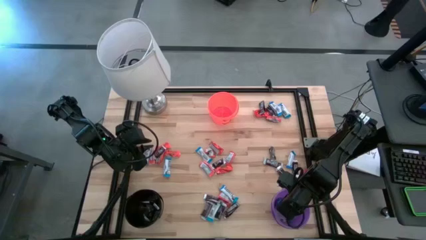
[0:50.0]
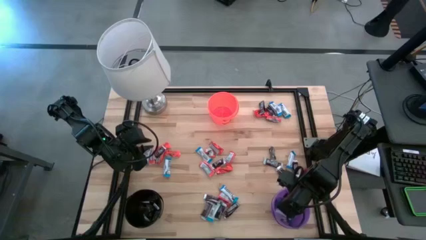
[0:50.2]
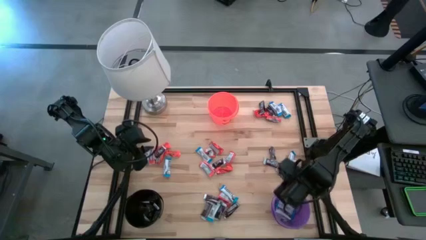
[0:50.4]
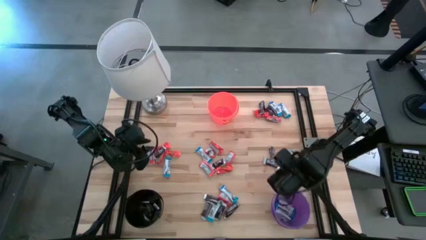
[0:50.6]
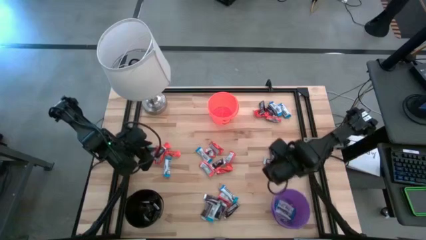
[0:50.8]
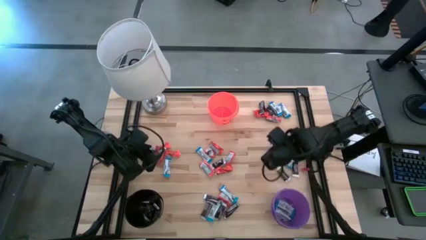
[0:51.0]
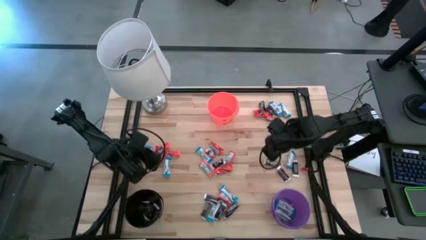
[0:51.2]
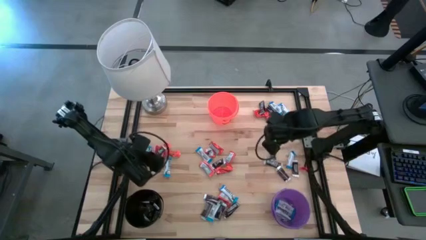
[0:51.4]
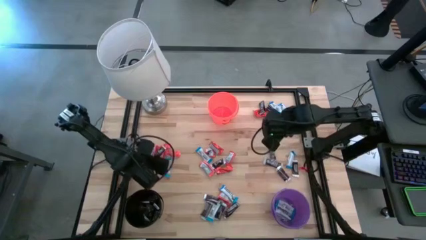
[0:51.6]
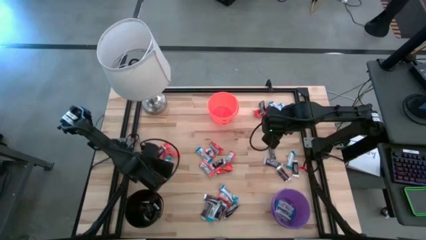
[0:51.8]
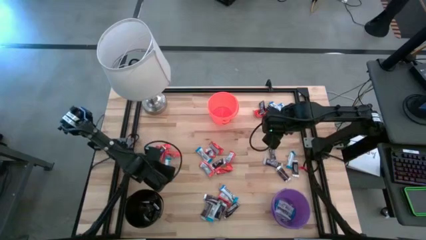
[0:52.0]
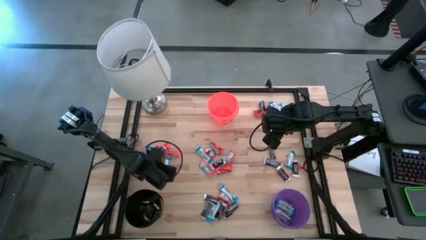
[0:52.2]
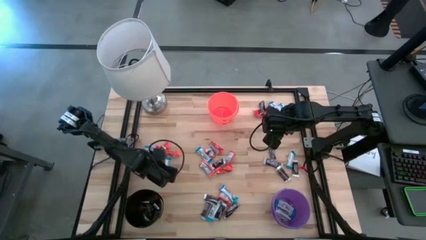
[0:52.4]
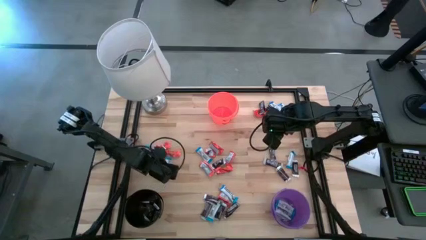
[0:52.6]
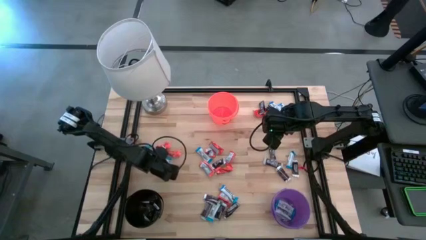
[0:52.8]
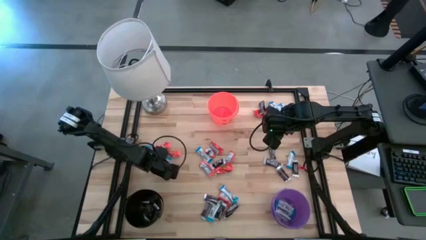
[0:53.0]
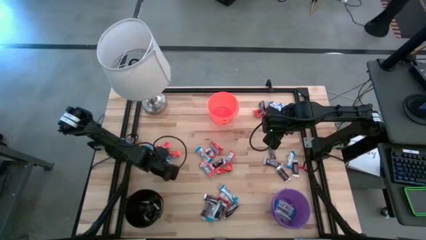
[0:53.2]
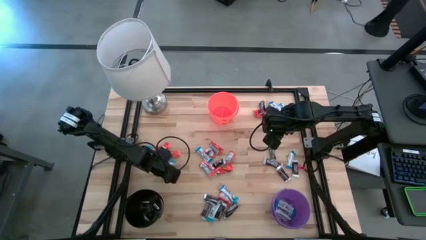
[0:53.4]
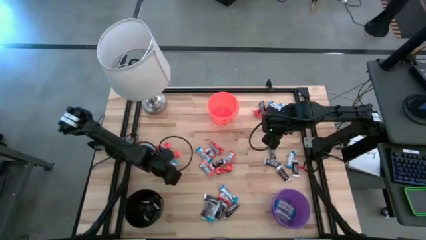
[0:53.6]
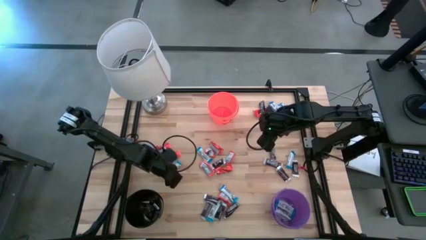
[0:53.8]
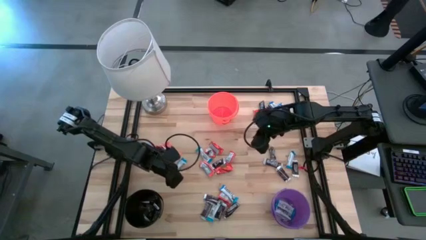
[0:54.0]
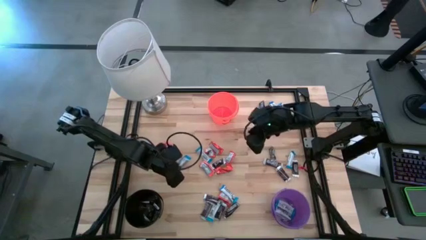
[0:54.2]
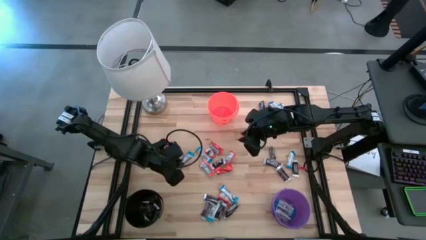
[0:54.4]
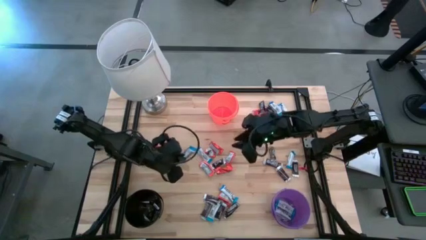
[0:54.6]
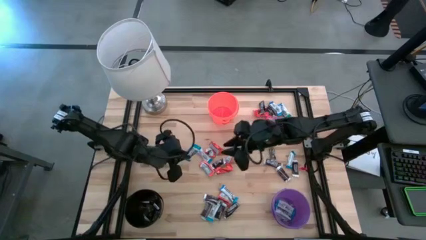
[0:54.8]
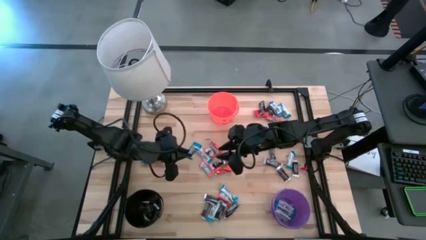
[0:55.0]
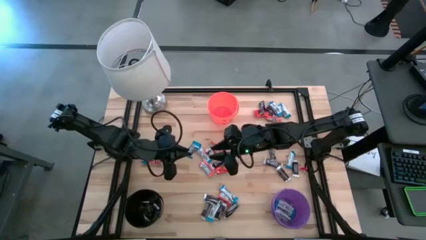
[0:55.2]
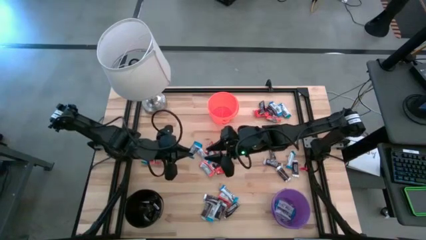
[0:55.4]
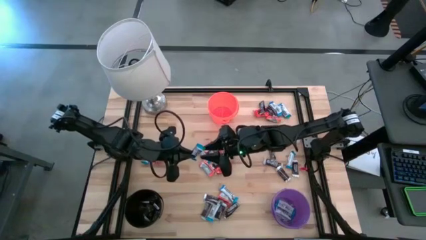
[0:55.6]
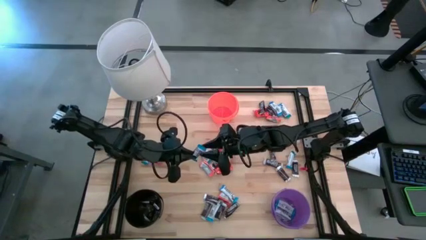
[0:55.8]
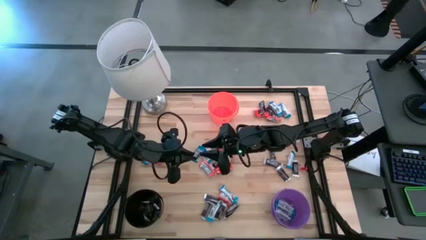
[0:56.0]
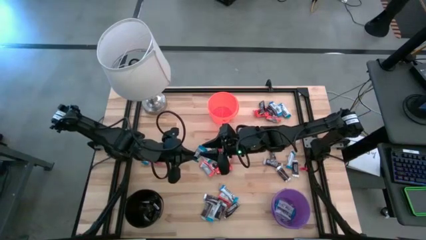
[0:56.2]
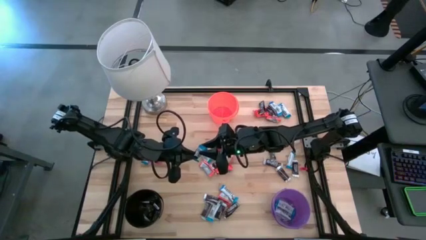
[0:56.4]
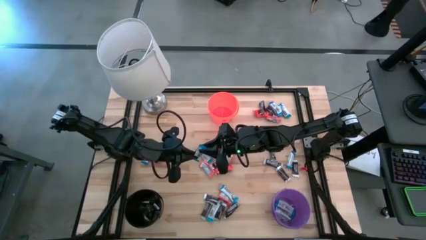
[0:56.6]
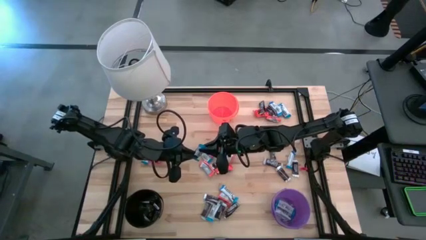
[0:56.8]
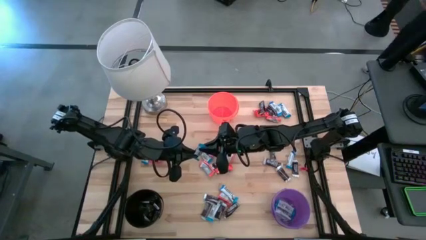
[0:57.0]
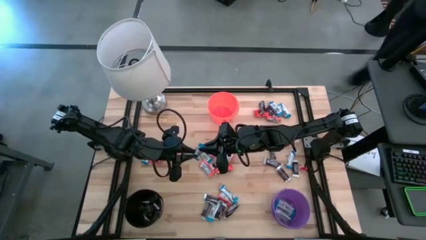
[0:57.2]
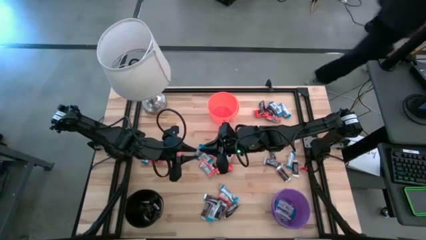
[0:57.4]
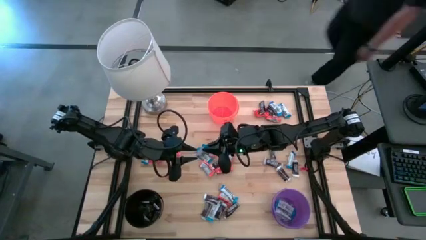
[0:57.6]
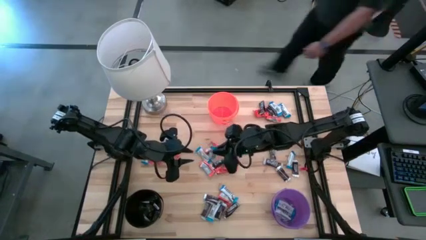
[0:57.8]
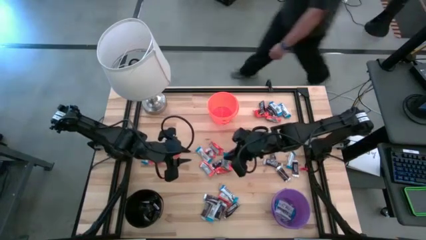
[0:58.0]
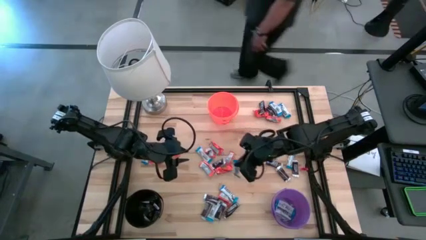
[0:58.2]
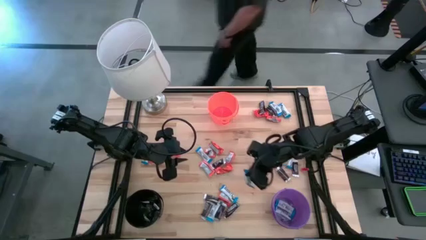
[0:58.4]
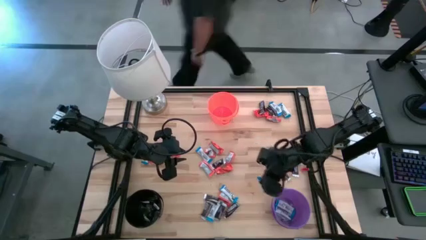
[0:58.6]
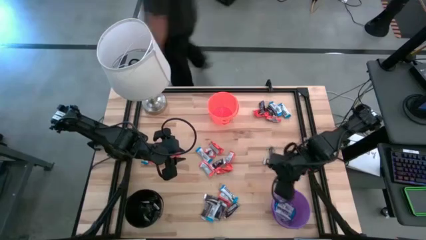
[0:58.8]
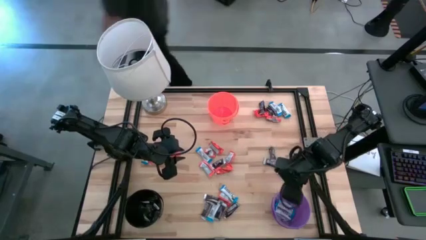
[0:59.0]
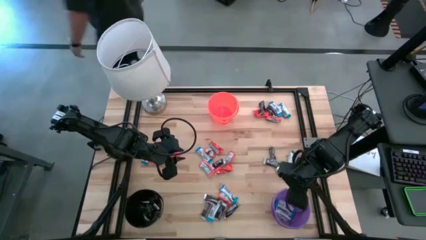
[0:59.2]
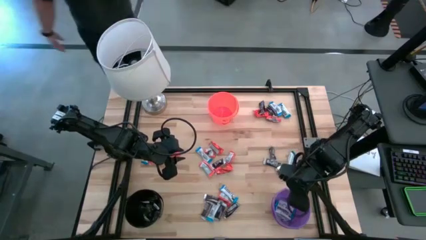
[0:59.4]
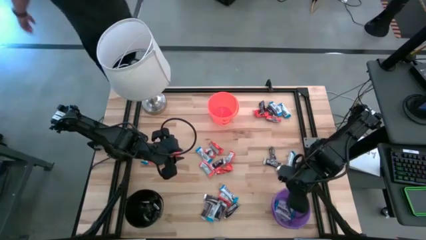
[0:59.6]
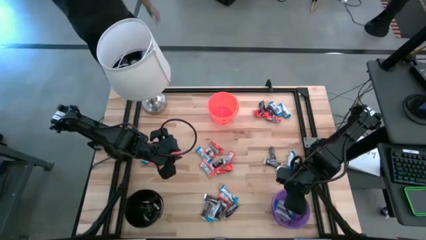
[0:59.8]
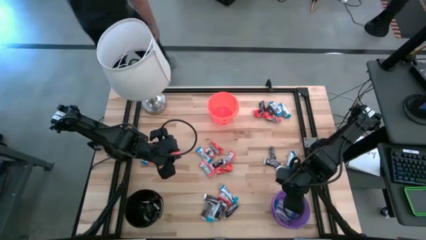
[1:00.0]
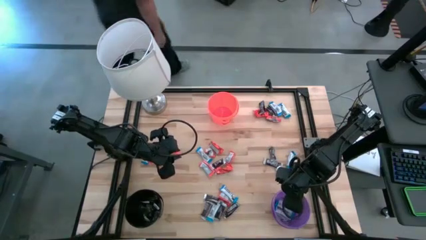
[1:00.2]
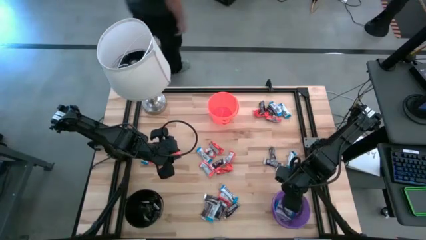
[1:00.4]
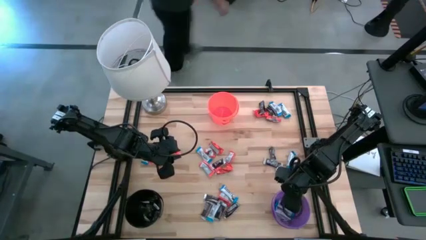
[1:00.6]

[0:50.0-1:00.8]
Task: Organize candy in baskets
Put the white chocolate into the purple bucket

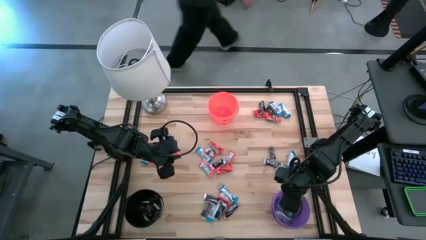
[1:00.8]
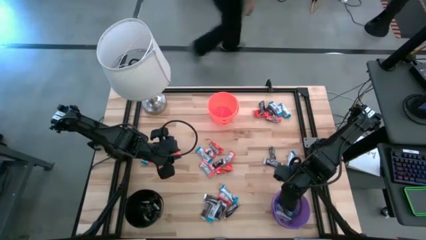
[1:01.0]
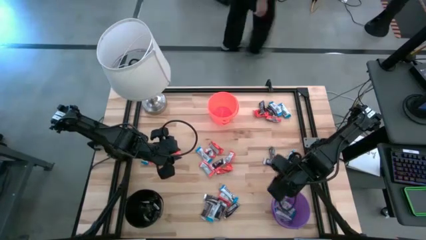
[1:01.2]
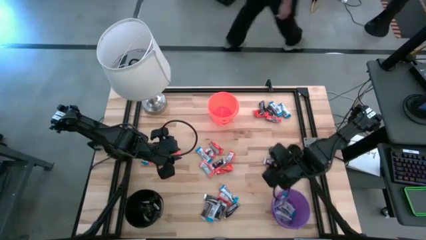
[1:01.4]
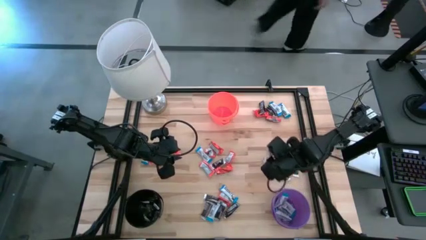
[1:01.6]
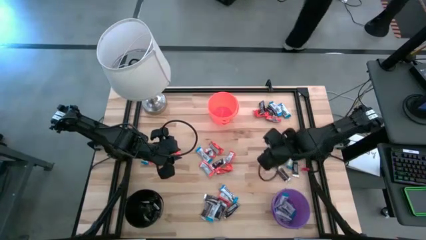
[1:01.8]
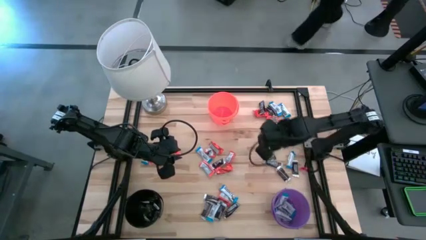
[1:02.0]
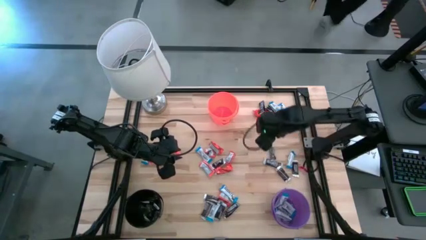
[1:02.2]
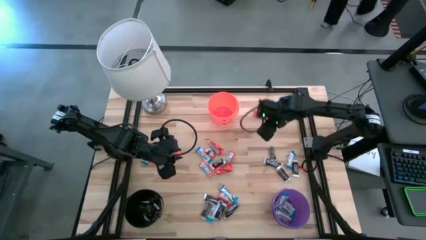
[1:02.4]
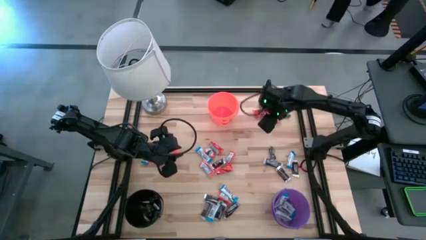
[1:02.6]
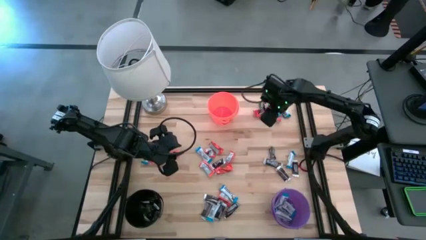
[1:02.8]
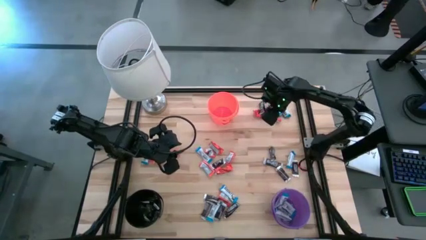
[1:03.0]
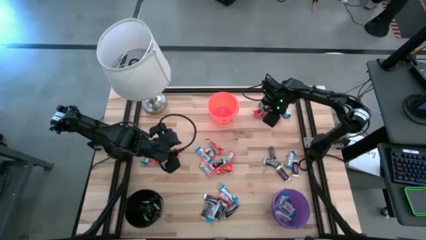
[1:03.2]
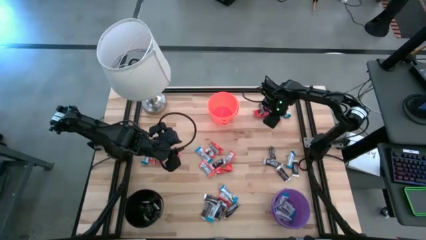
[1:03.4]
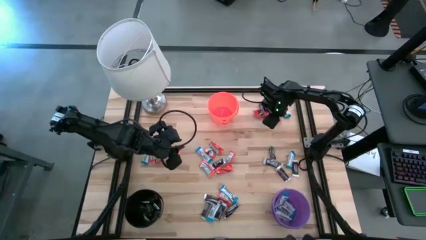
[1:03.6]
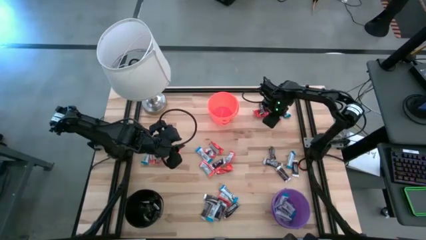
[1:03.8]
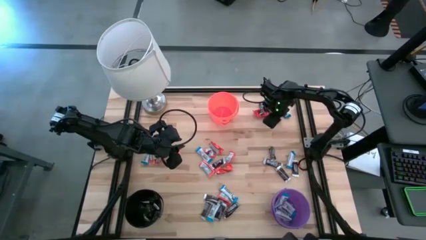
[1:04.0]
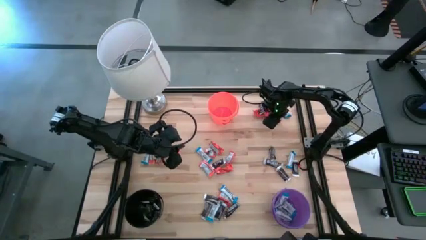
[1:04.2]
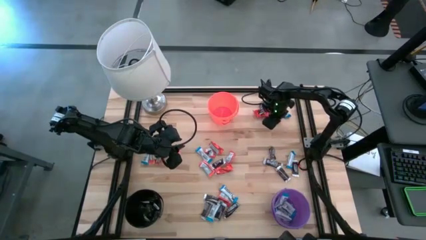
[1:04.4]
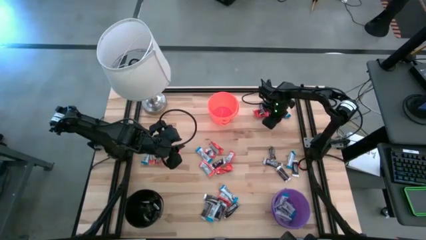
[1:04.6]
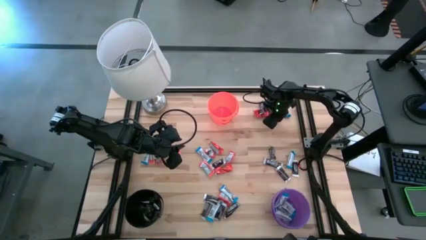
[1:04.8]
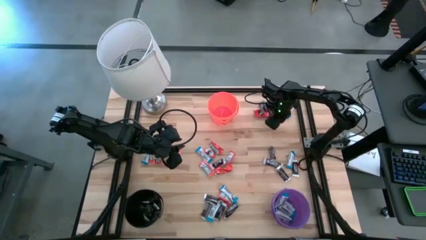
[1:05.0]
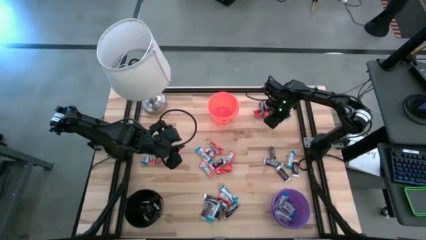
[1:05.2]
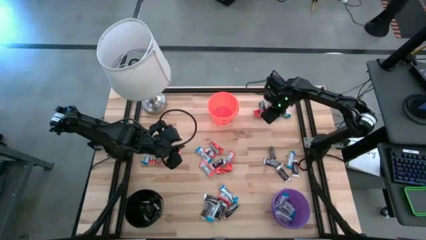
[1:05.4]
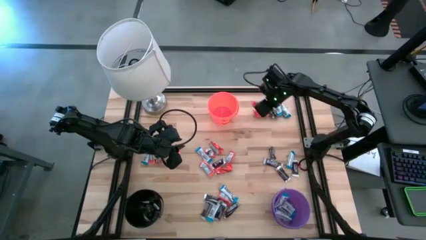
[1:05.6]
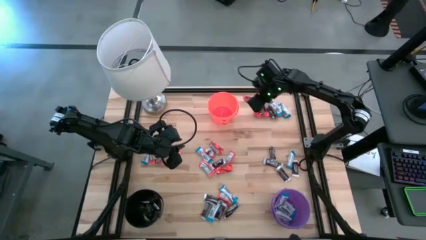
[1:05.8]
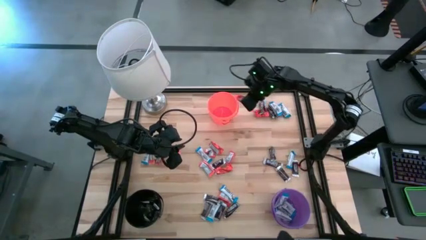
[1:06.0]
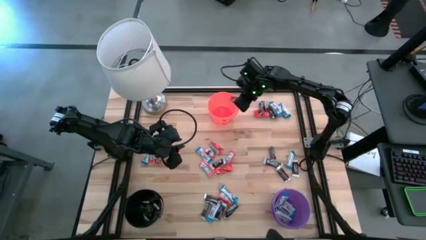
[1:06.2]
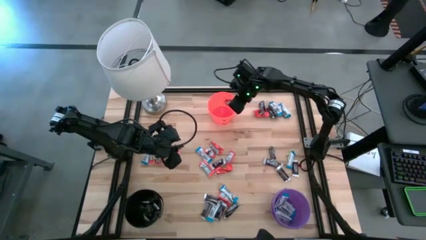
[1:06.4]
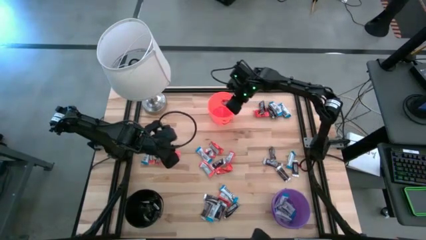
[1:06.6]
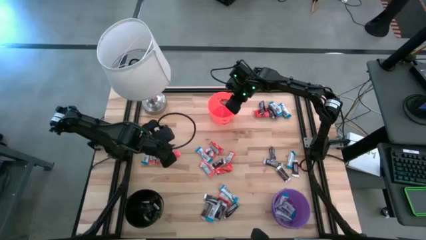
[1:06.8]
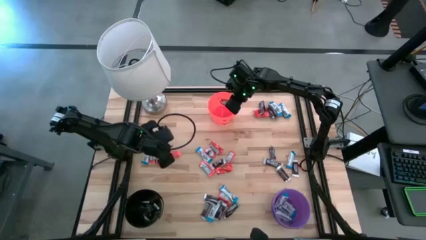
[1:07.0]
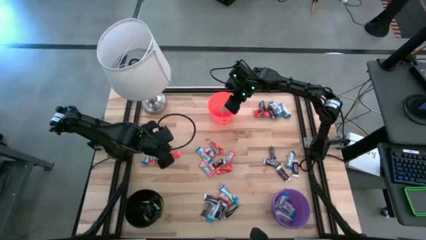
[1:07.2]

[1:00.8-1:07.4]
Put the orange chocolate into the orange bucket
